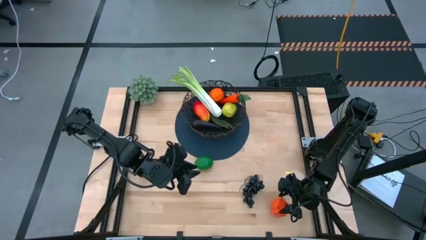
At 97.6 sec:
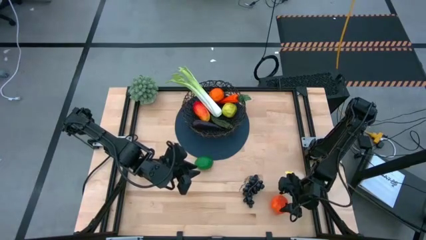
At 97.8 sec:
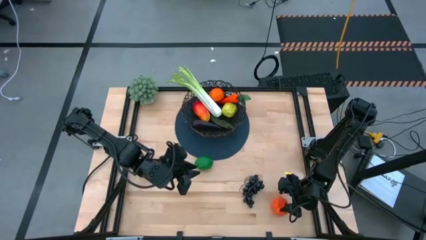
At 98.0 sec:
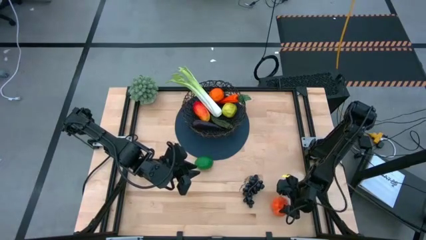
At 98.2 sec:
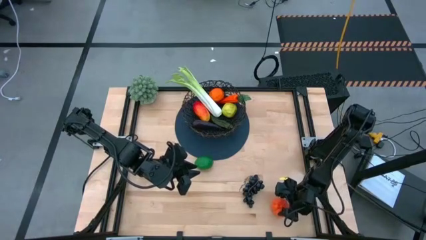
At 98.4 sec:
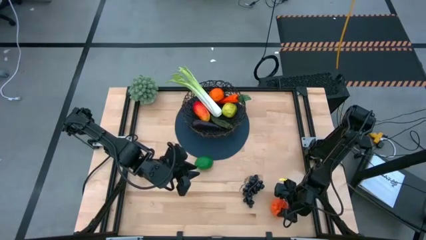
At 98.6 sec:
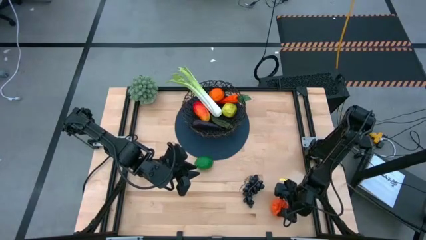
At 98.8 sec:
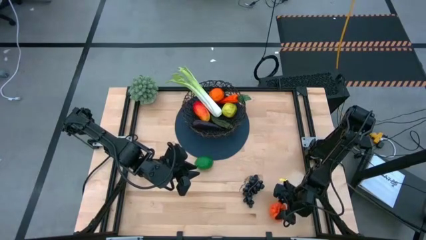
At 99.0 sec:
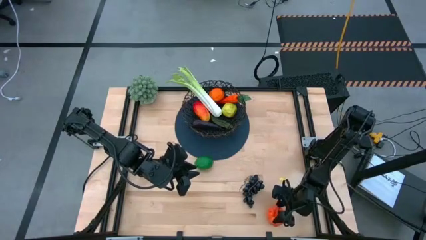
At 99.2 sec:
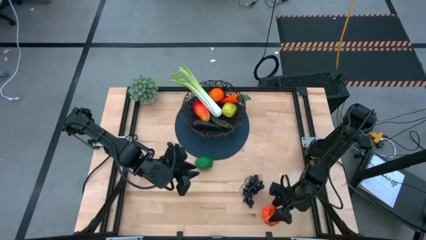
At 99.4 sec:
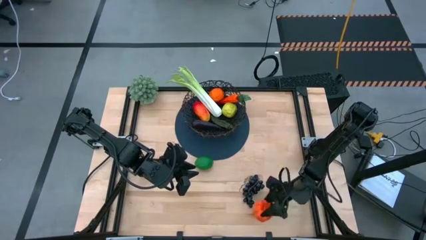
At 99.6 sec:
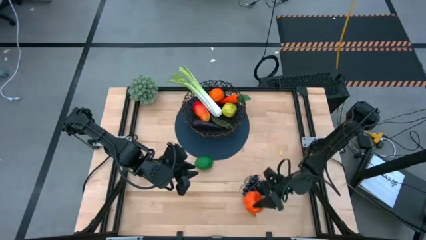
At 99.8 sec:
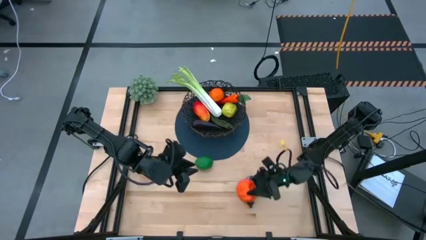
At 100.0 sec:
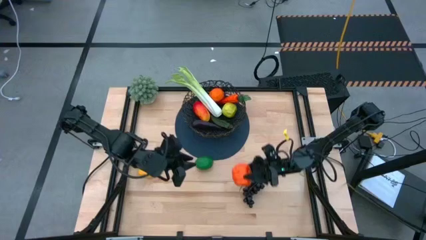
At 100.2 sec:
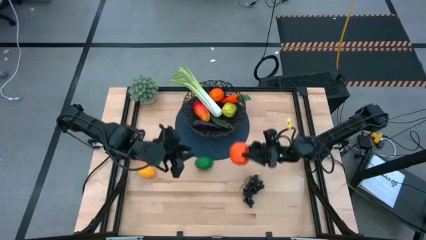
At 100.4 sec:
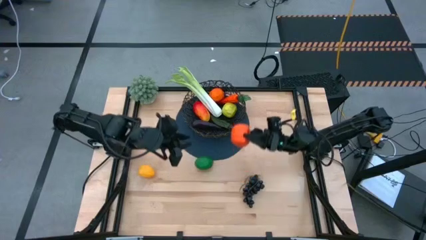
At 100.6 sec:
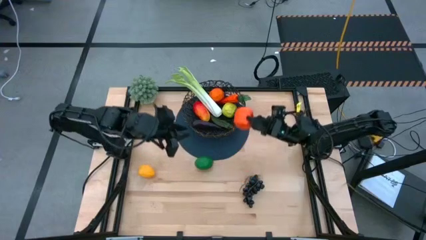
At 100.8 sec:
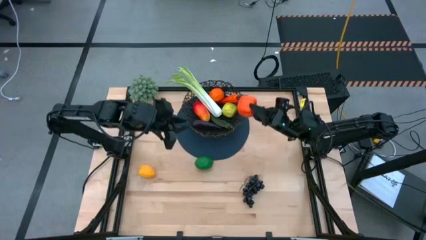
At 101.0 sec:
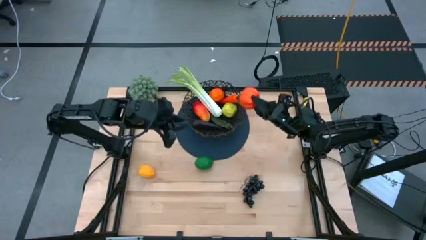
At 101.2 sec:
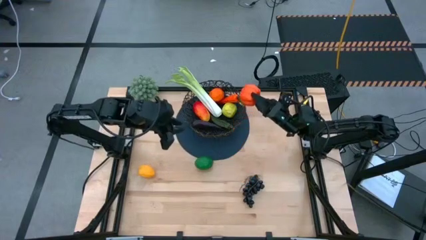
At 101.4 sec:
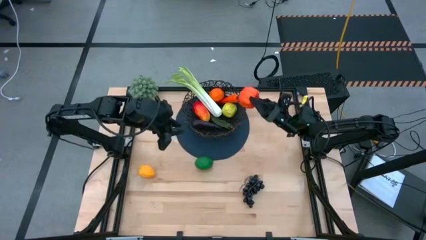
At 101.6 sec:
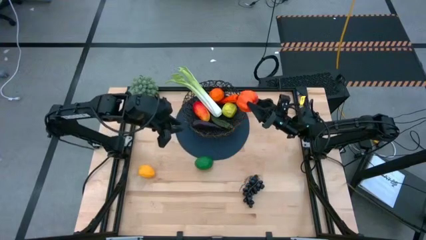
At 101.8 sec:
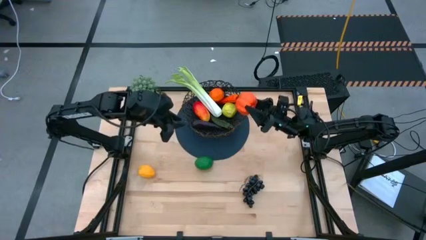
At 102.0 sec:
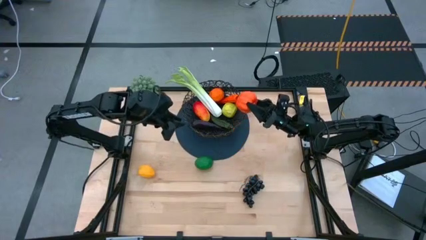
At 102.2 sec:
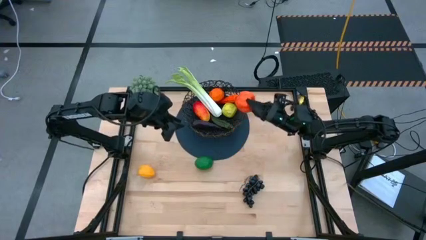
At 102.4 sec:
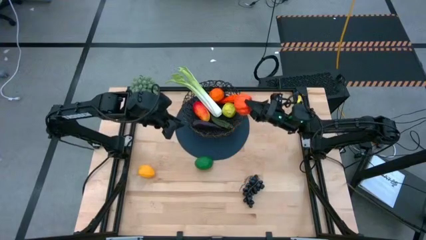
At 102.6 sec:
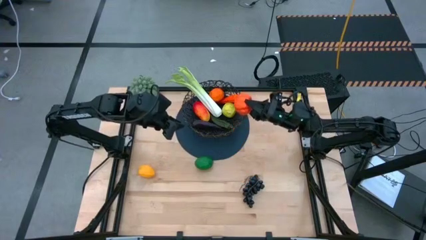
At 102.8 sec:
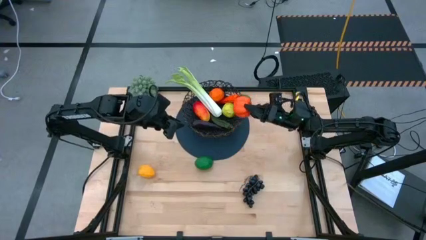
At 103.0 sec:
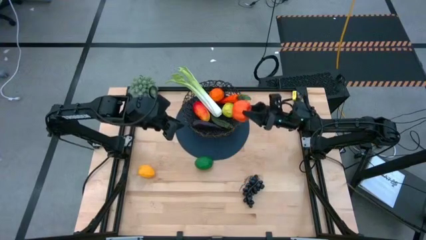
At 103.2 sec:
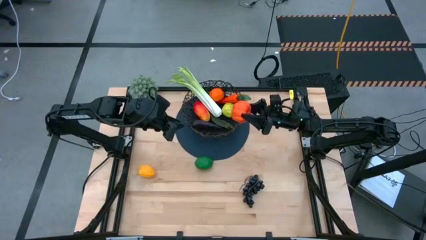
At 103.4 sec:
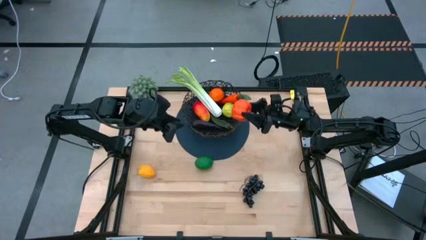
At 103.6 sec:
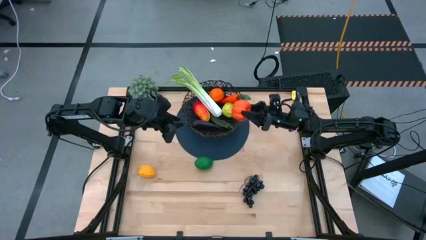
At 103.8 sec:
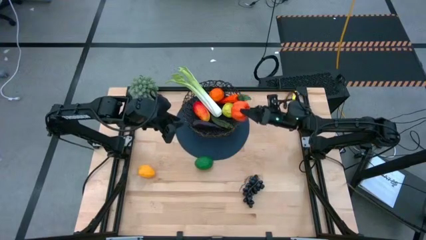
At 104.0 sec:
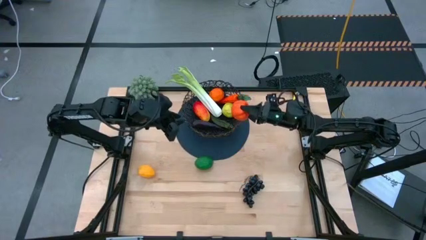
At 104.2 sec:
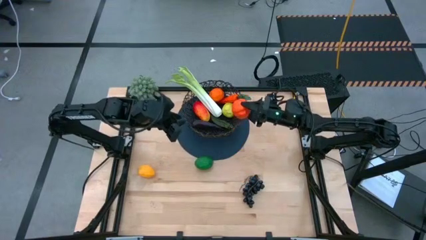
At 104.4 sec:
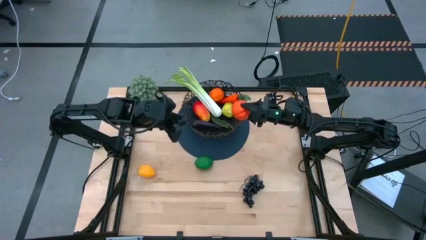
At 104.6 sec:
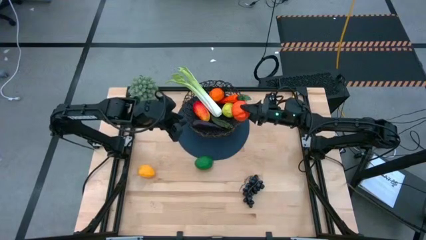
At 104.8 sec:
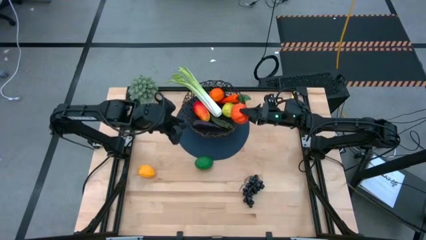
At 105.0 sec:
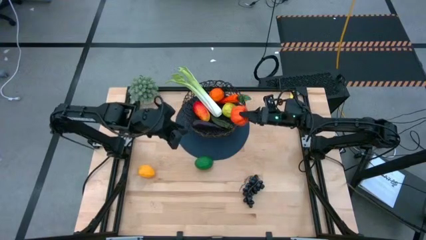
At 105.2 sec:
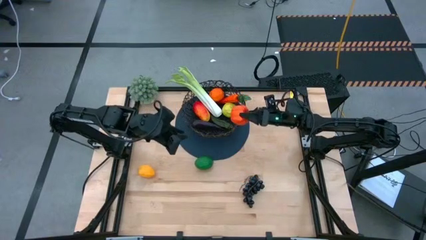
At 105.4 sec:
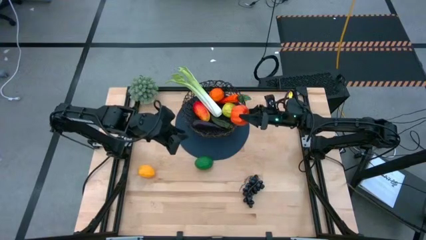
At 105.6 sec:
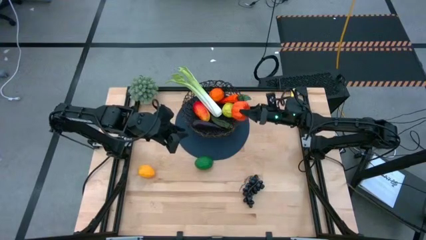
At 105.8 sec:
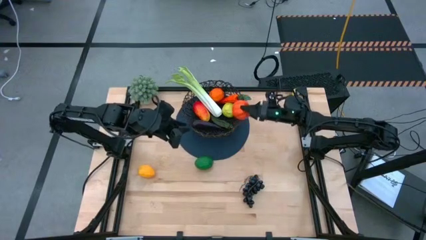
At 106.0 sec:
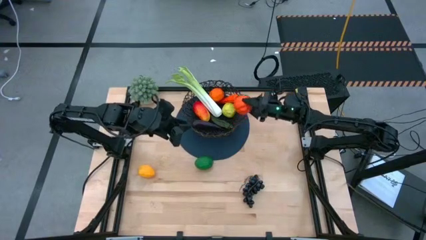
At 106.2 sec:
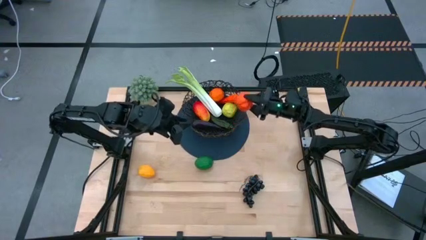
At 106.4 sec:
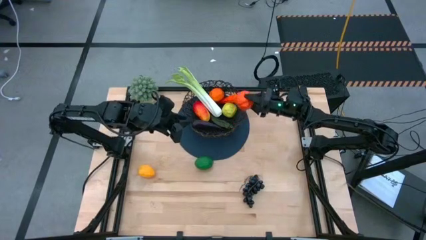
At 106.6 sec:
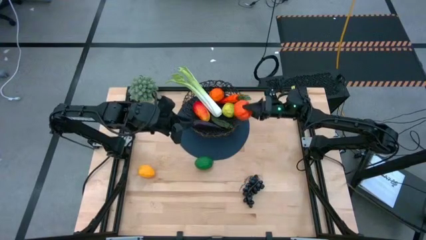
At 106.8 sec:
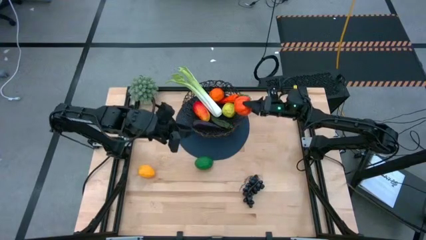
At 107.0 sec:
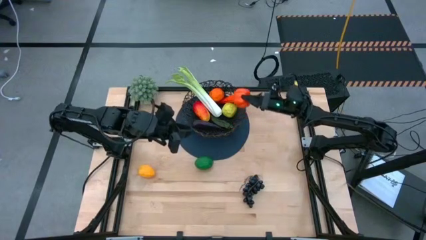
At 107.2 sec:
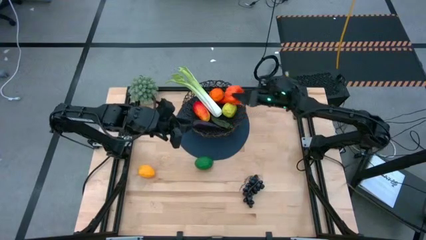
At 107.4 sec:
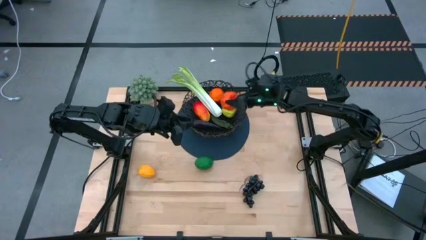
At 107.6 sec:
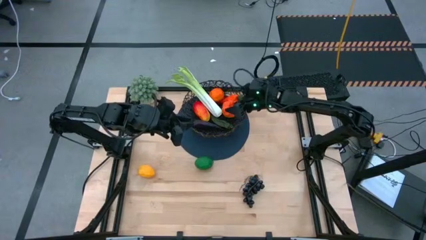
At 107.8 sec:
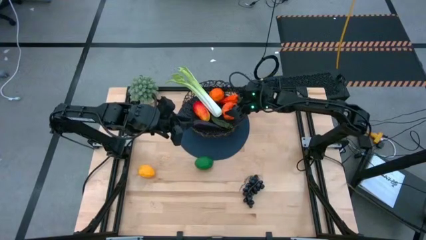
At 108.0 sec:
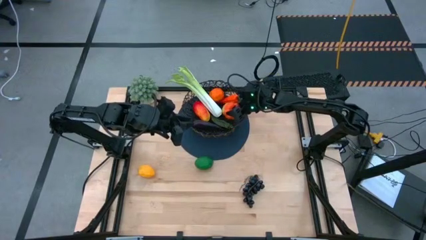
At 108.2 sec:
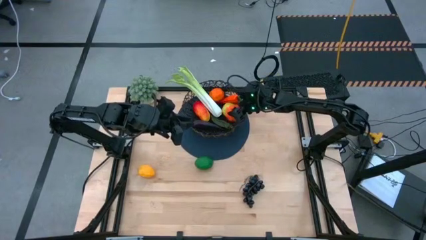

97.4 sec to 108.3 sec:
Task: Build produce basket
Put the orange pumpkin into the wire basket

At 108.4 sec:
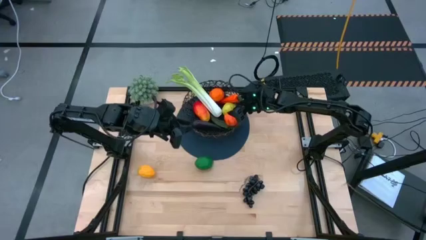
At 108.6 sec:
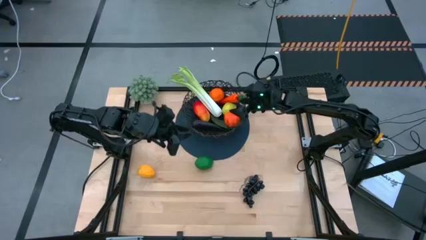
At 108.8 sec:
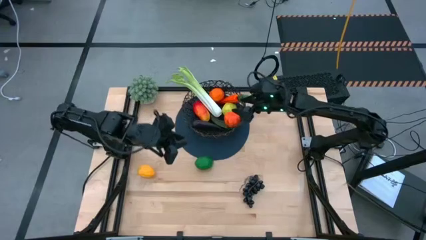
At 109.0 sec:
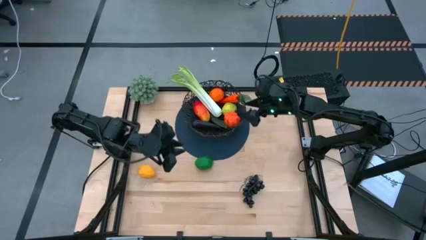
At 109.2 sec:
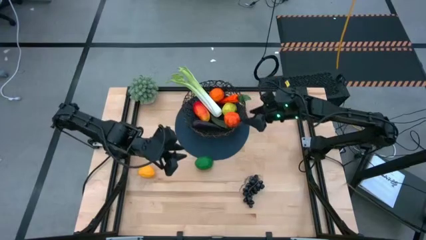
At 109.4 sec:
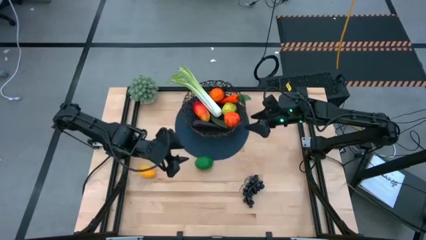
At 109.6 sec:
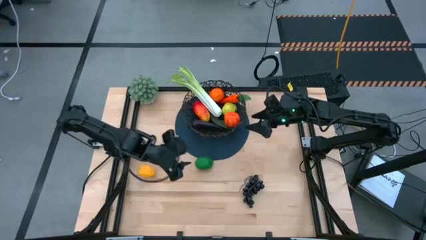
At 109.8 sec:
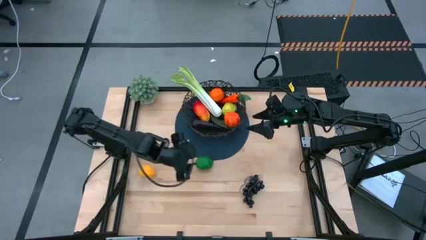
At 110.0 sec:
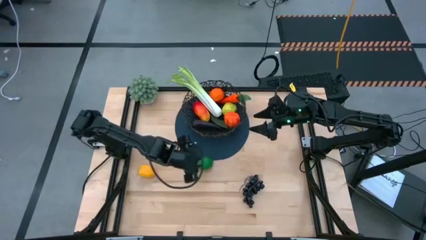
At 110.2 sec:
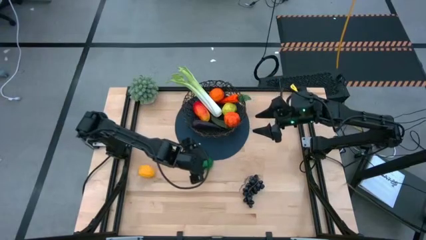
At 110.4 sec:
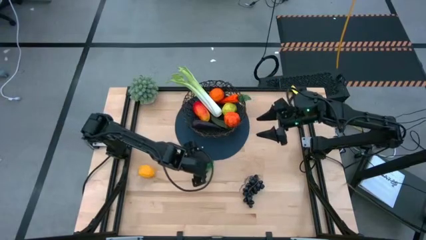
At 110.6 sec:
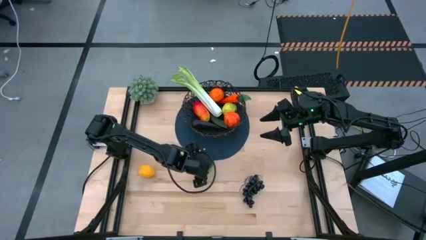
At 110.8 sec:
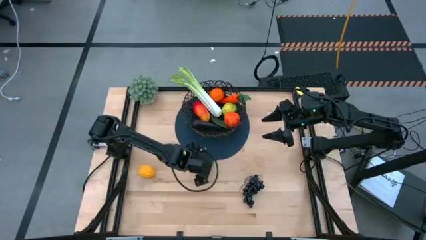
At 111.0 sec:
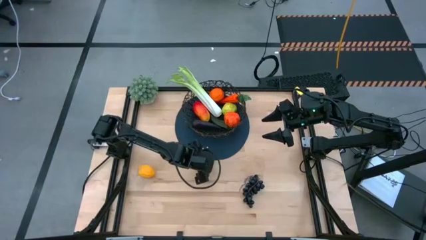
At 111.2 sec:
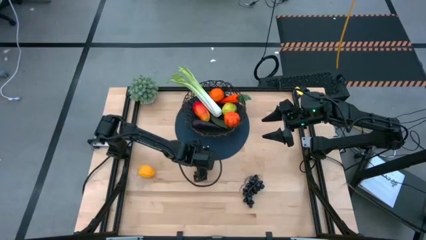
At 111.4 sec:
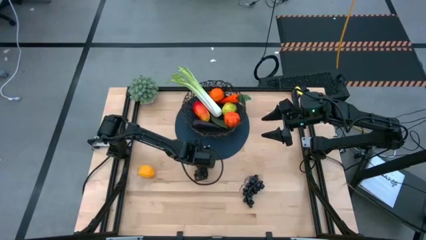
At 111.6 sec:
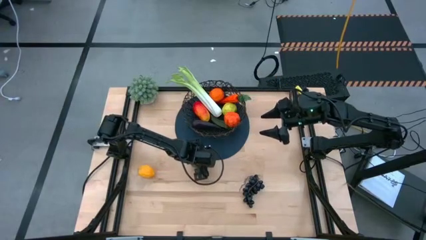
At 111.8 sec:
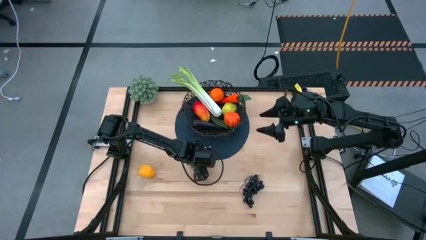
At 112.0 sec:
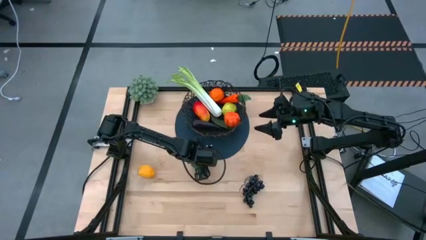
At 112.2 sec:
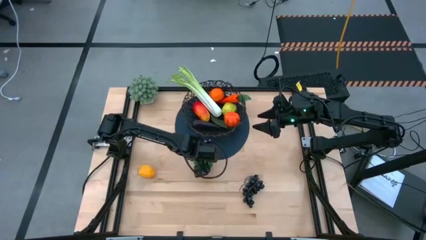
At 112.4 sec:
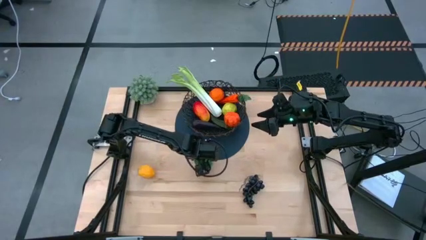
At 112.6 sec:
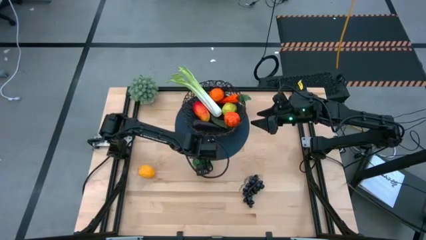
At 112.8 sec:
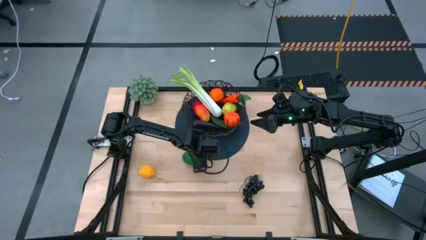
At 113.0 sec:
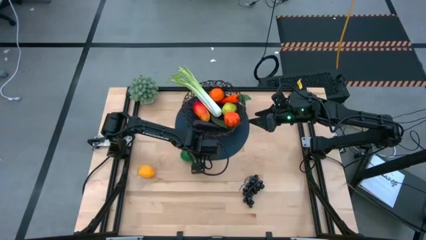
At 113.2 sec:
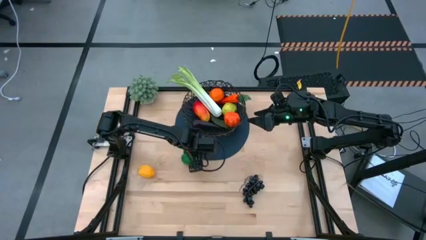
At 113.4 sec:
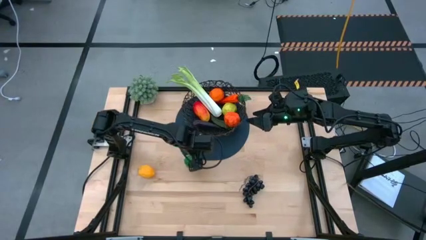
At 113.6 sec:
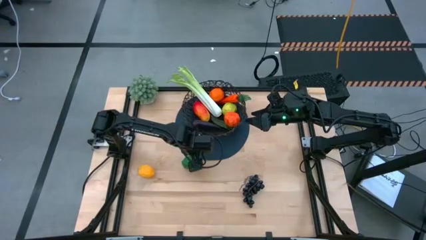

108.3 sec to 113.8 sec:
Put the green lime into the wire basket
